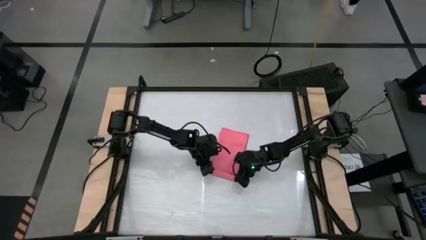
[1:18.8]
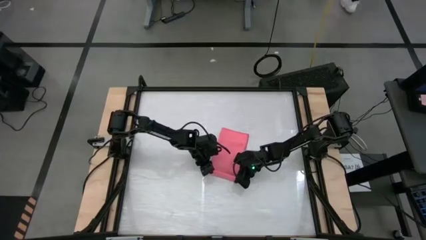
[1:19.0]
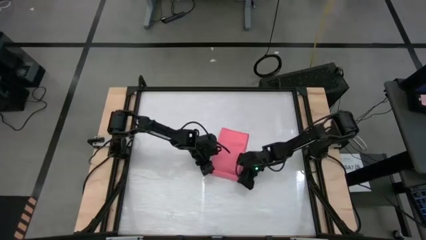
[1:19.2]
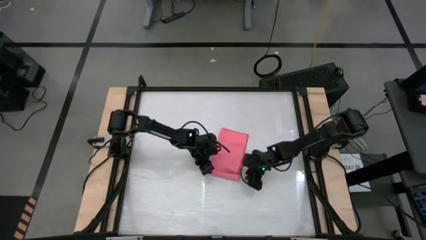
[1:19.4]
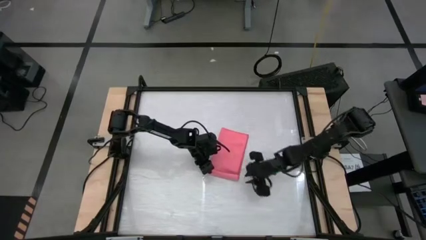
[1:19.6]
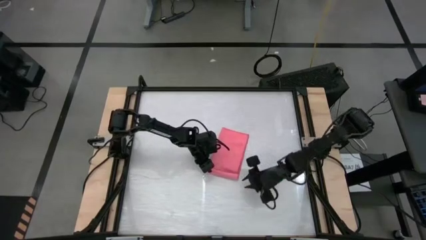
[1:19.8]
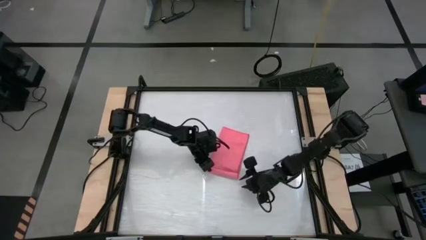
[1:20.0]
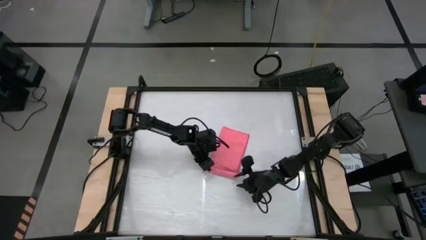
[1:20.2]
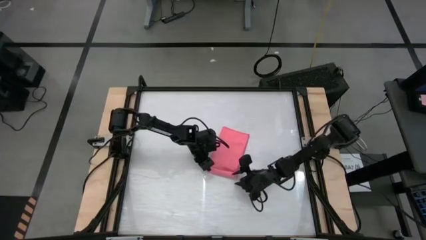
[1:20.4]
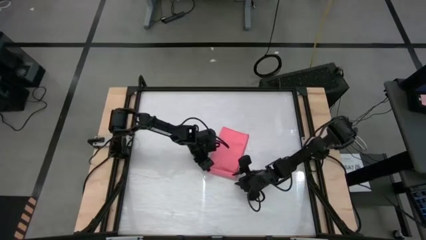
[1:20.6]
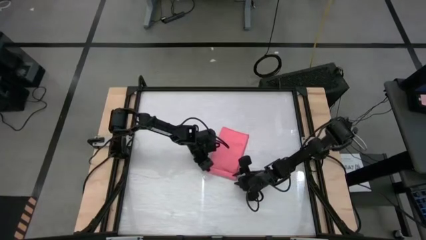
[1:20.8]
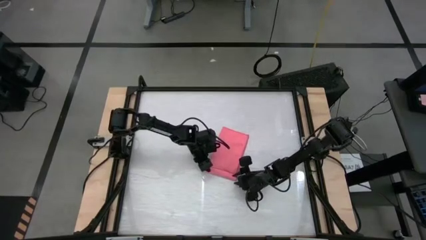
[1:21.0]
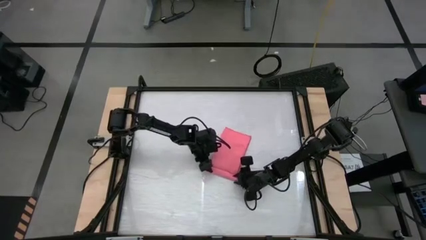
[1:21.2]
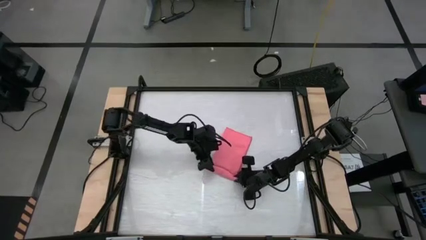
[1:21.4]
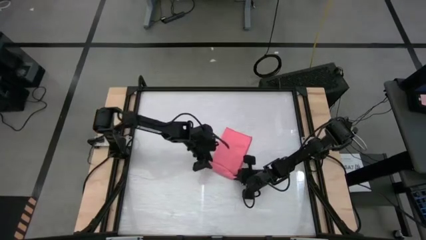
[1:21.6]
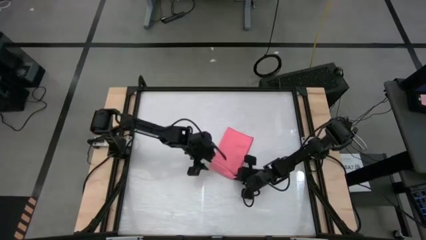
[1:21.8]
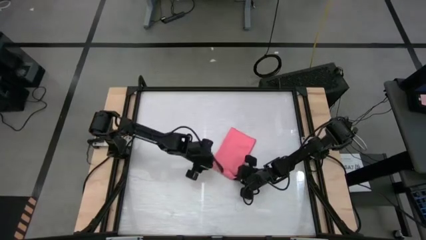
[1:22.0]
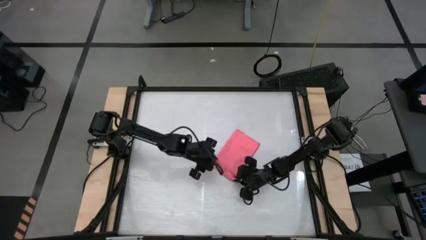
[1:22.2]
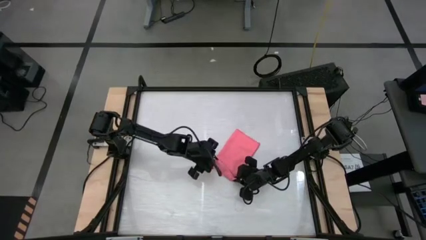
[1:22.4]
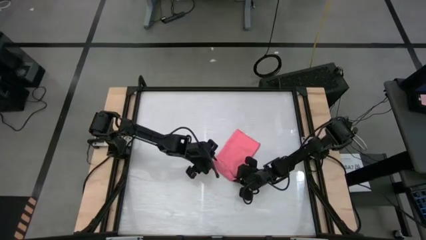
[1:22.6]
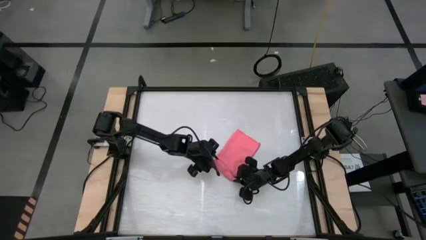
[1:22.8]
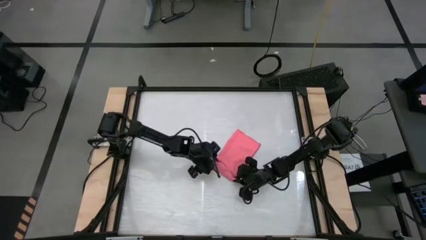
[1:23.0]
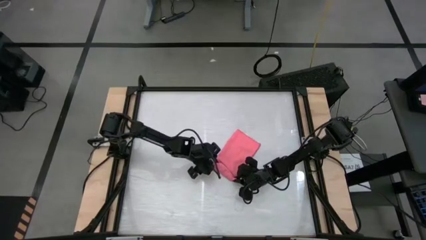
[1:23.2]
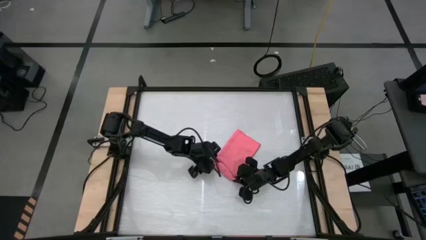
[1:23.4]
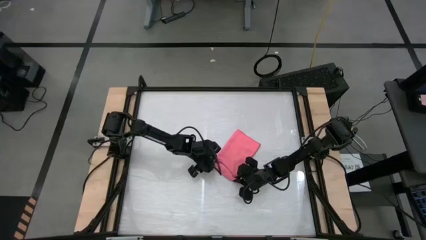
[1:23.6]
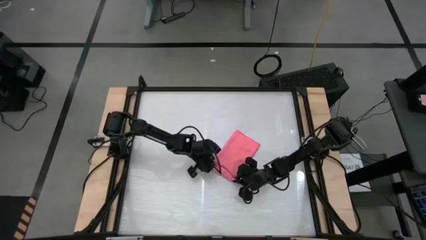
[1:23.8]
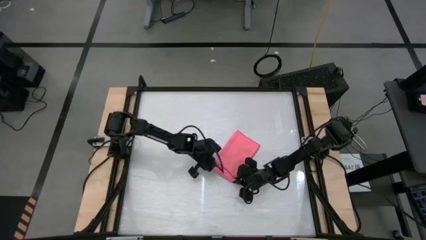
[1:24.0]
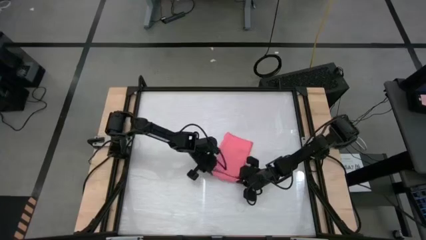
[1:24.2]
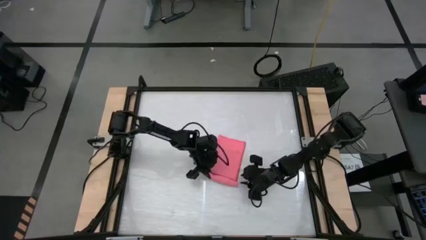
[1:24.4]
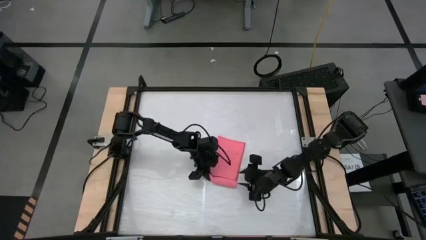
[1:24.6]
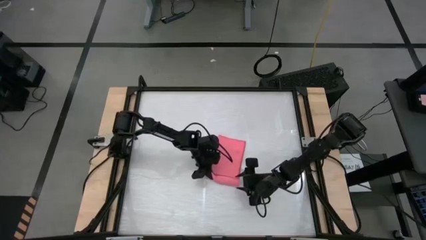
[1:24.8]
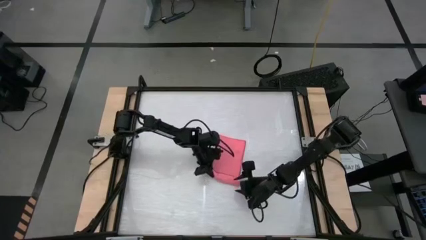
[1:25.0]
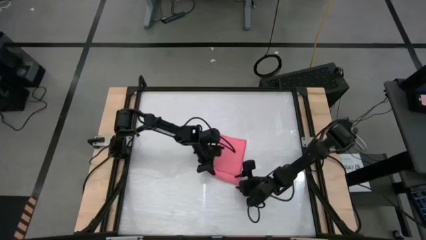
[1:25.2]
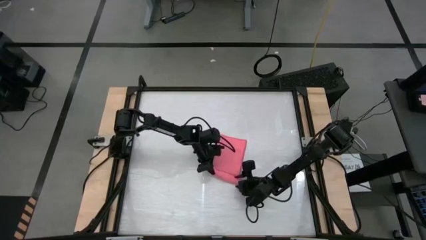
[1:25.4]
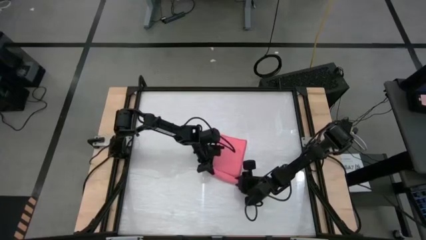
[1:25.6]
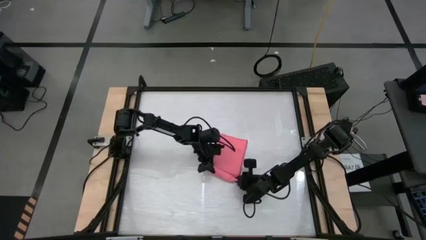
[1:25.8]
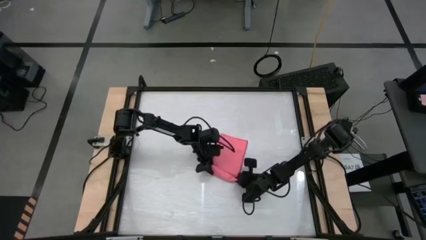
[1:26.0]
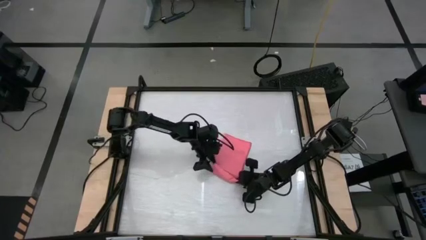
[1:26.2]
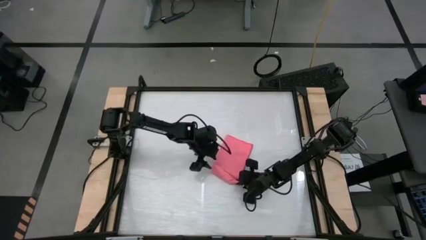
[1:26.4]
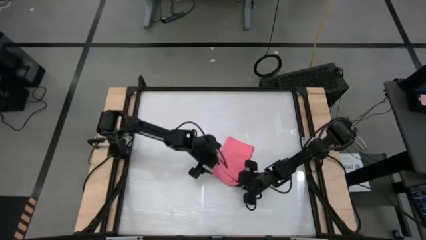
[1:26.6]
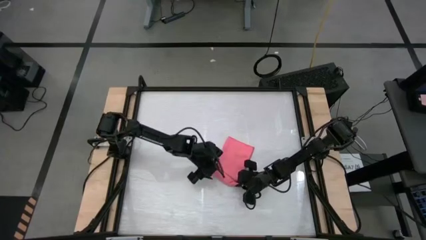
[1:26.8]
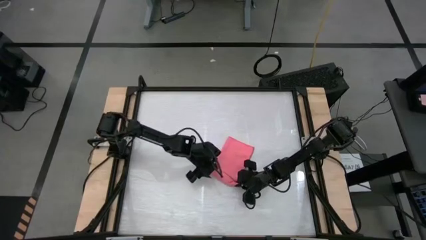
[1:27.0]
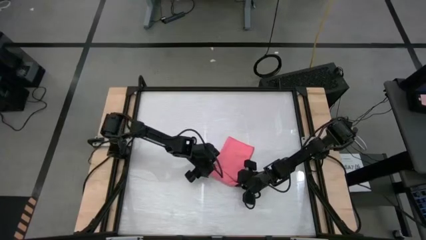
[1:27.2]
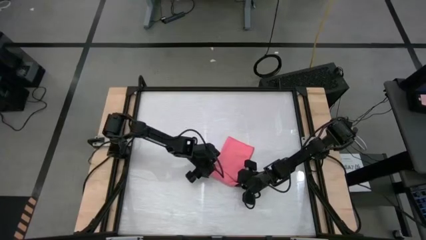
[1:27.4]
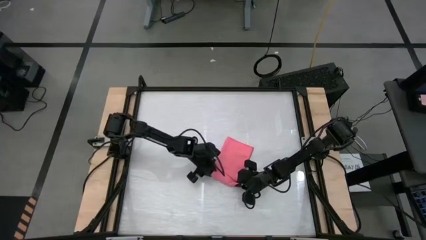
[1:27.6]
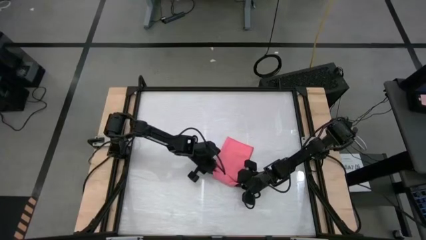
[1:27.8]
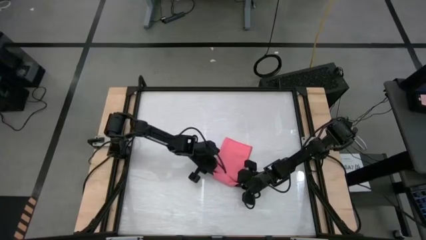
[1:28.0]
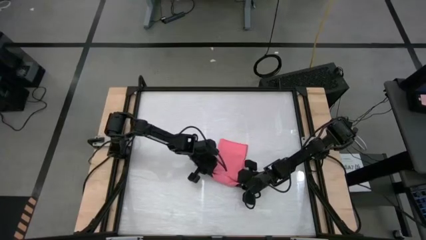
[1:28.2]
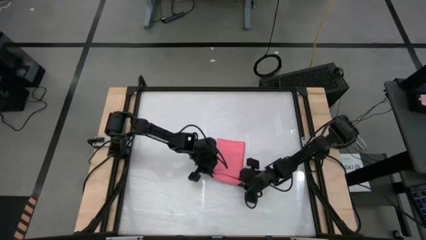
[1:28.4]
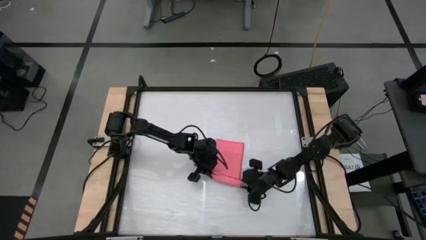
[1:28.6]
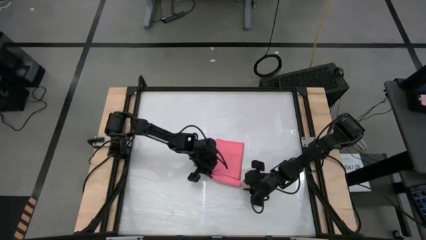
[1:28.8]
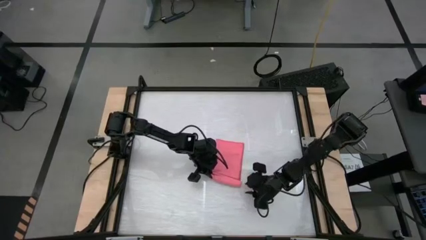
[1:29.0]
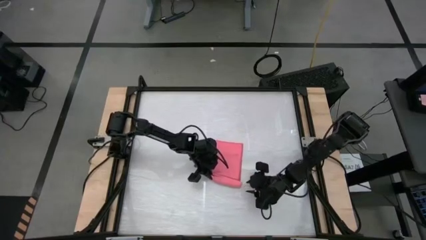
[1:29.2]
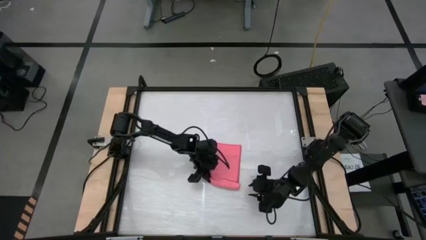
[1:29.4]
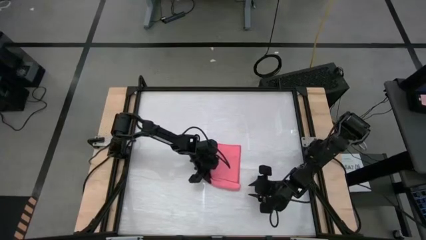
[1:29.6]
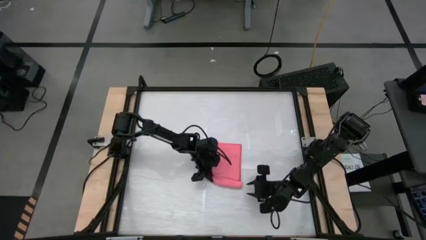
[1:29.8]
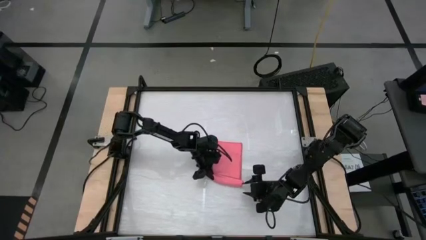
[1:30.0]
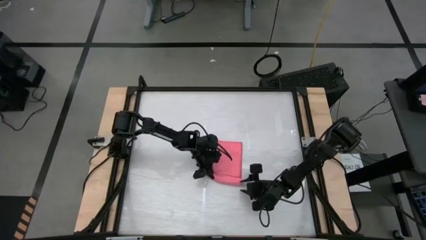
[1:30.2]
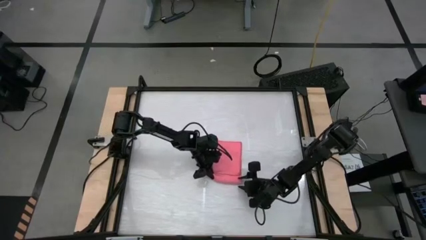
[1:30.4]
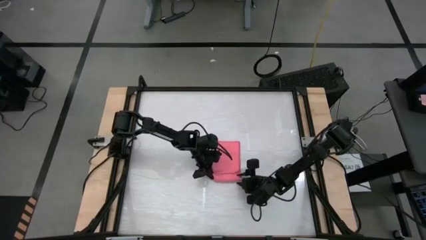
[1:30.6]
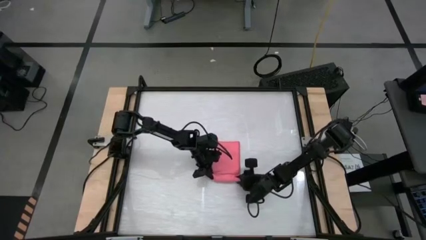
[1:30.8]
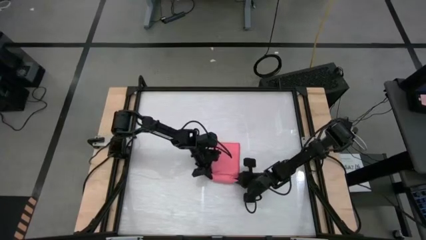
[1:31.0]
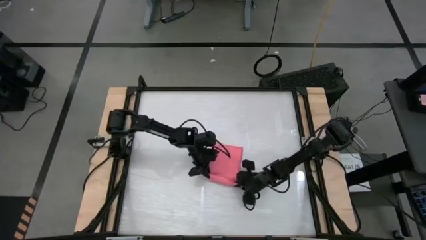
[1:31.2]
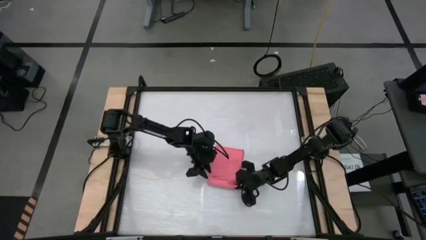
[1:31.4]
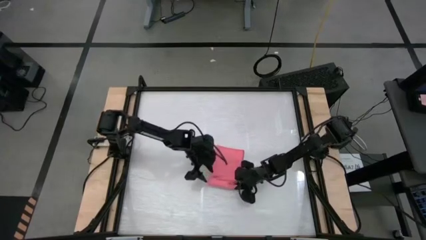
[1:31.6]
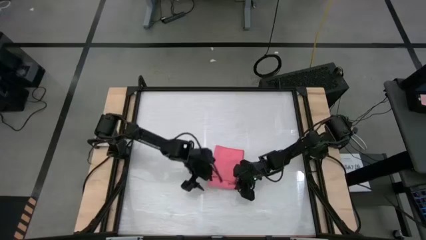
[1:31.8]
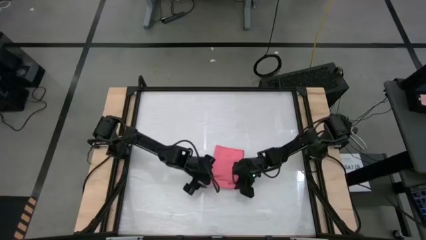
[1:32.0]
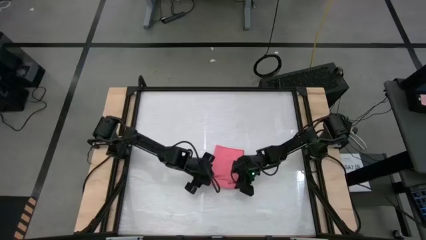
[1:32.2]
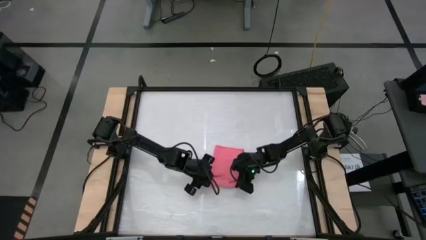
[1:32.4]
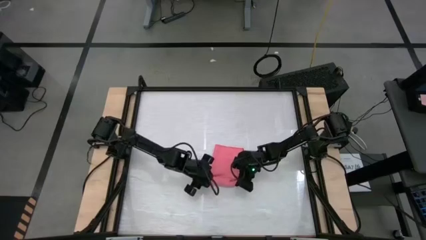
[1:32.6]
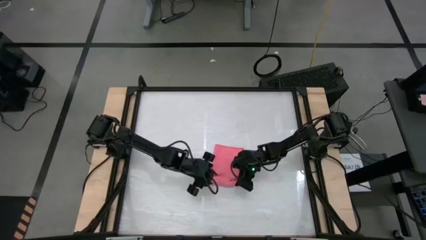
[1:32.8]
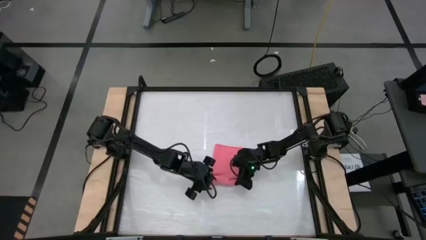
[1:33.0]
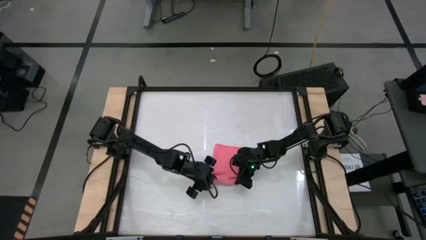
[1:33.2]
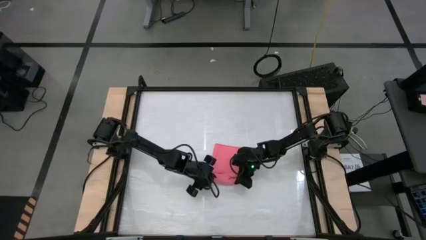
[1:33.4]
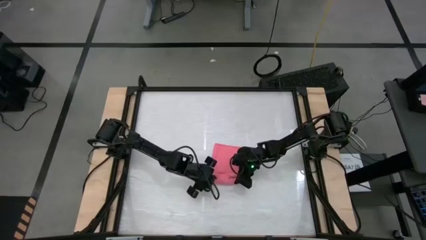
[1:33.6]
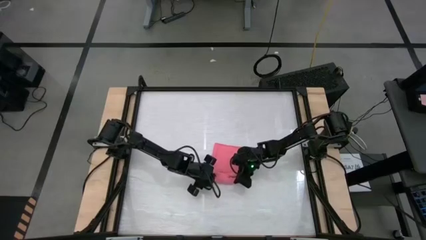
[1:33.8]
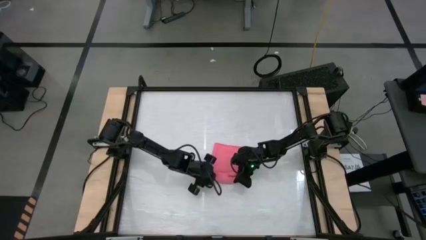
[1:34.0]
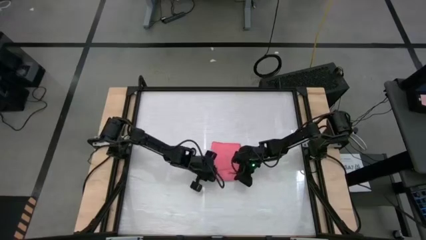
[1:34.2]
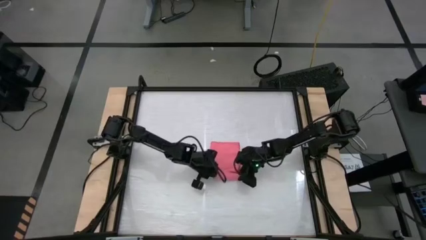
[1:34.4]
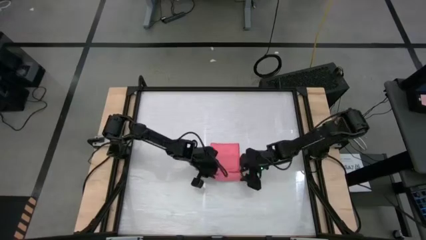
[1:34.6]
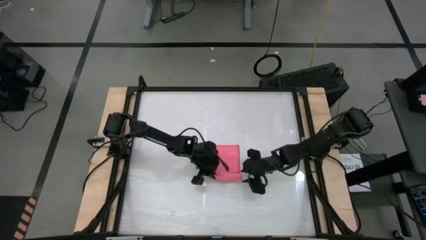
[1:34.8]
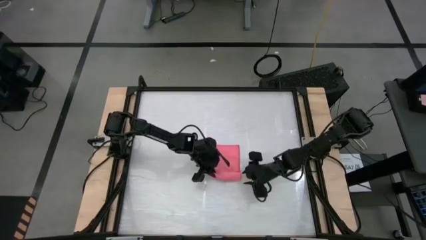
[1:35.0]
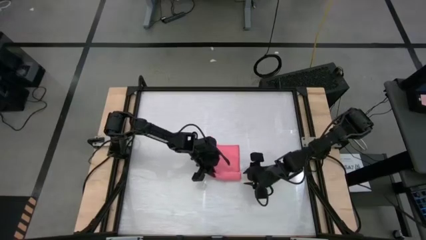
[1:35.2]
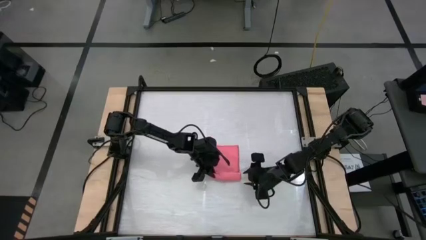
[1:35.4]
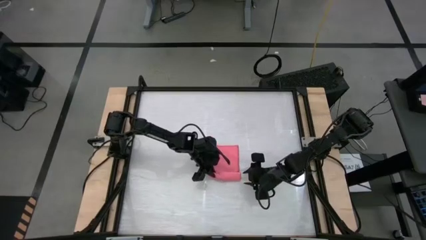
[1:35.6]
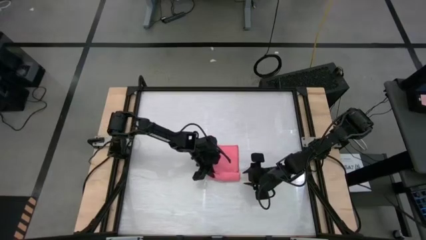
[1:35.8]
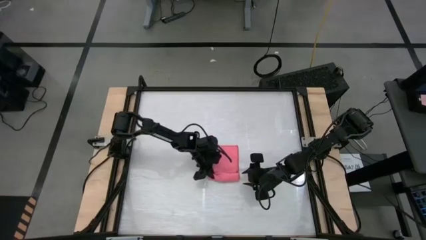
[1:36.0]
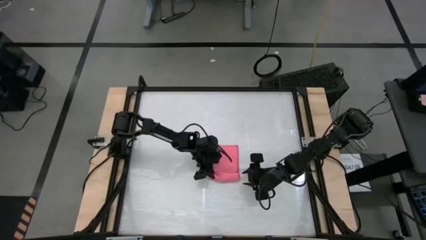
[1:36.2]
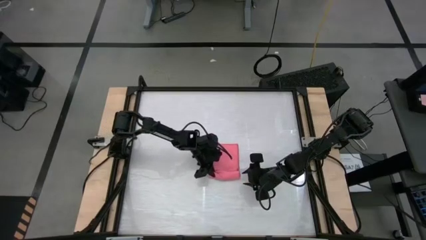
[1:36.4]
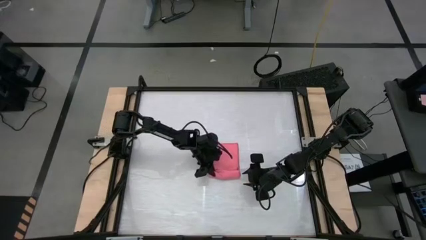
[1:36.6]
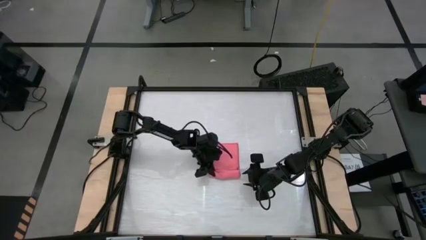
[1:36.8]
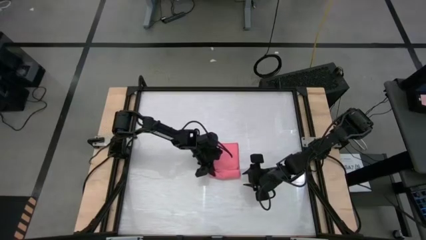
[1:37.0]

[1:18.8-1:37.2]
Task: Roll towel
Fold the pink towel
